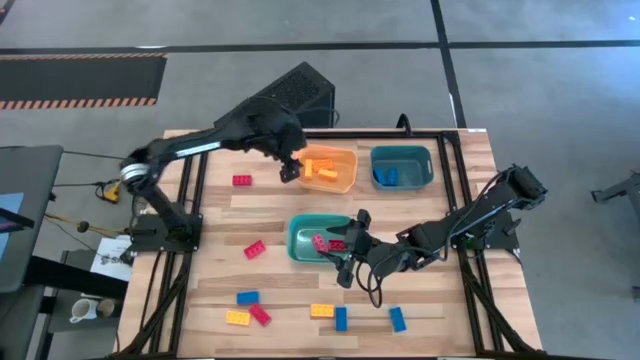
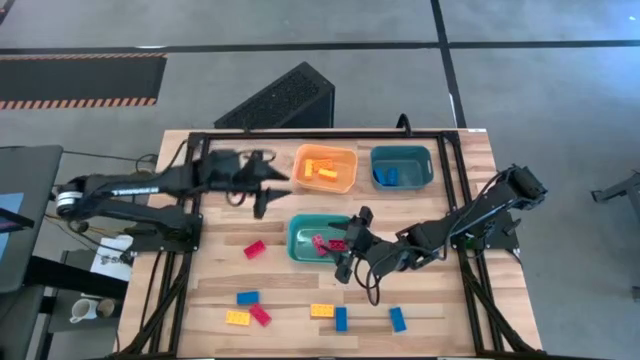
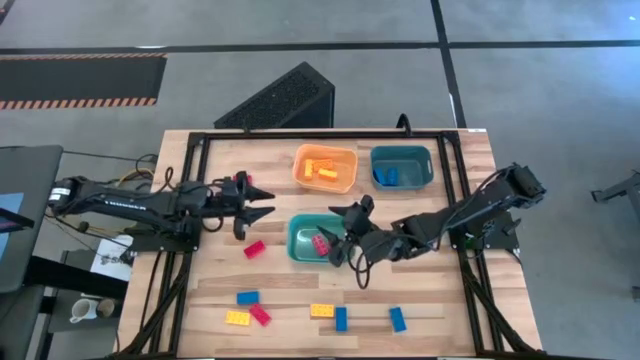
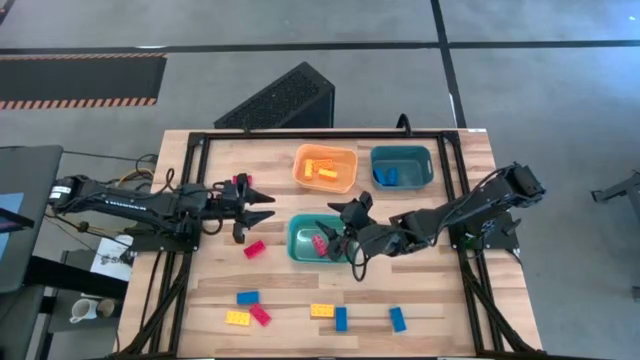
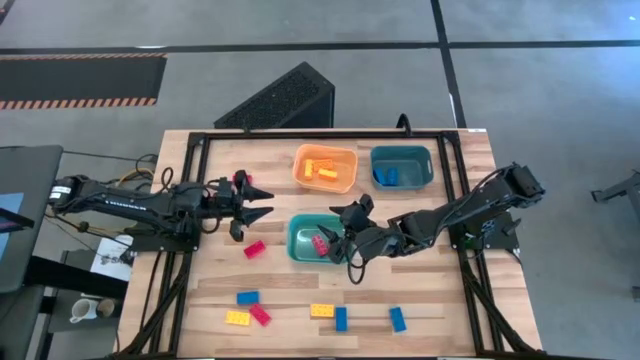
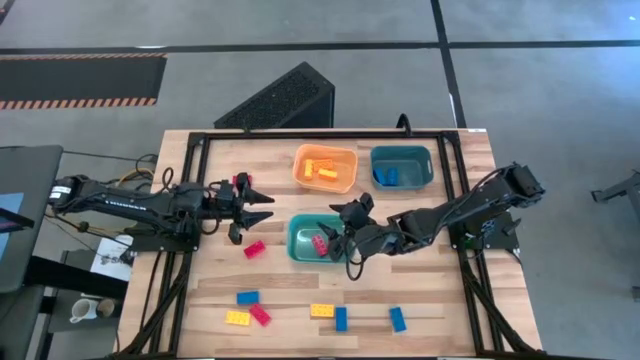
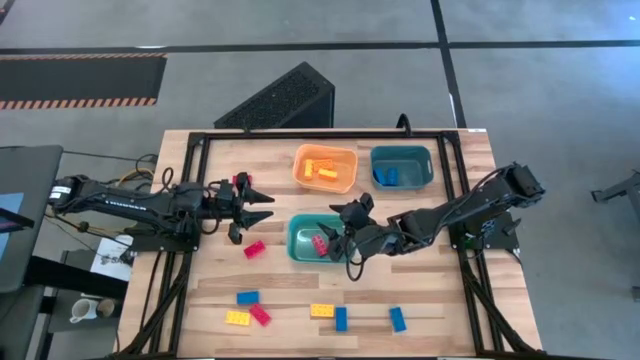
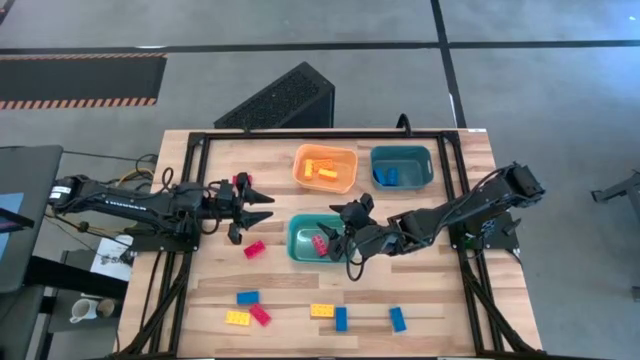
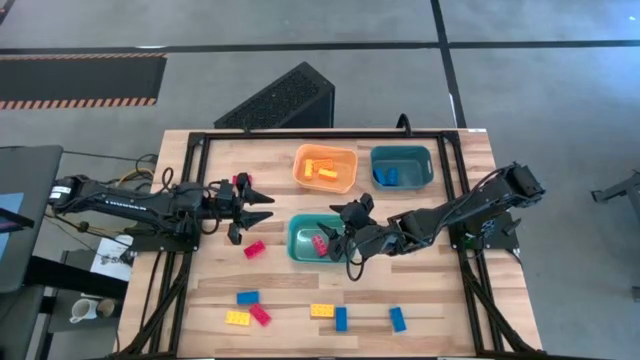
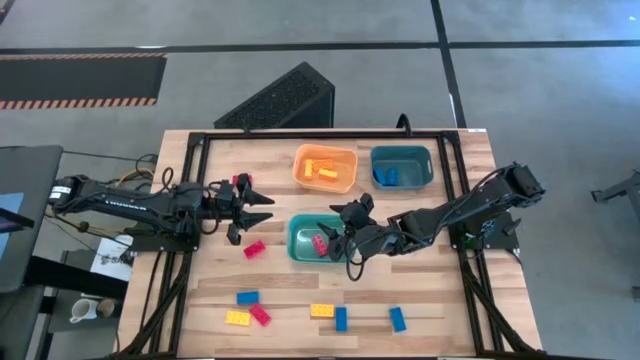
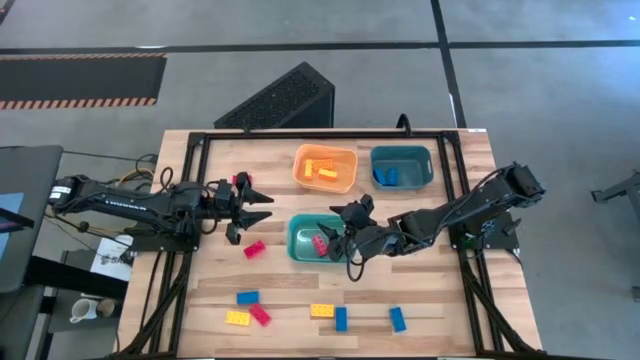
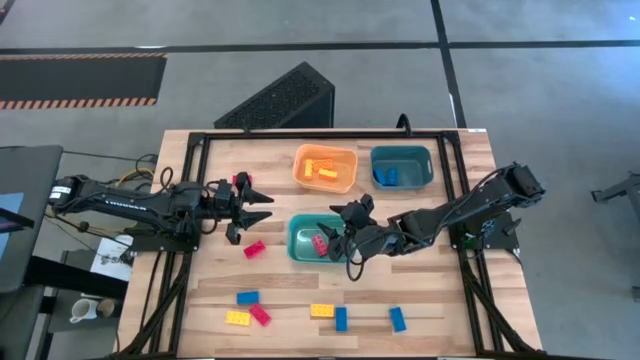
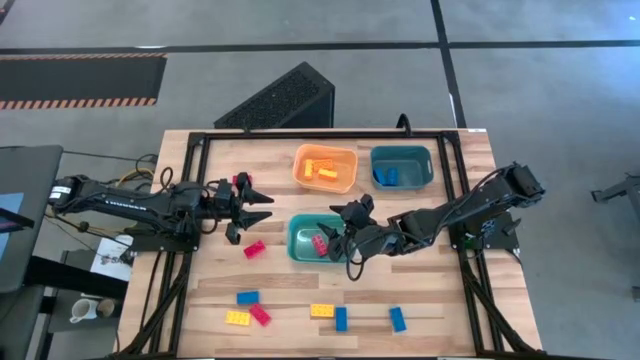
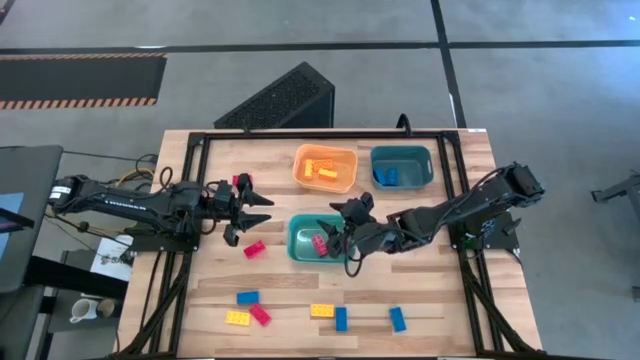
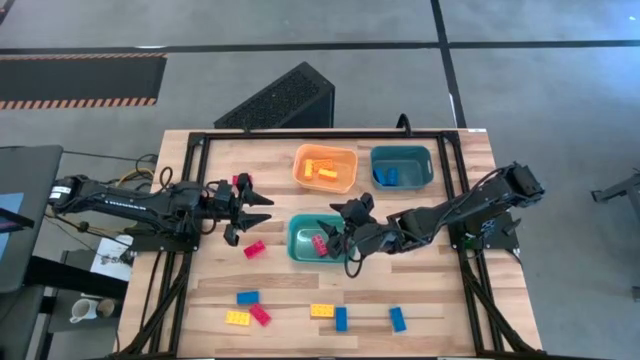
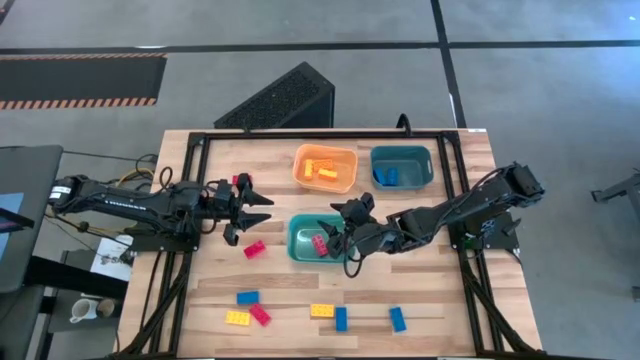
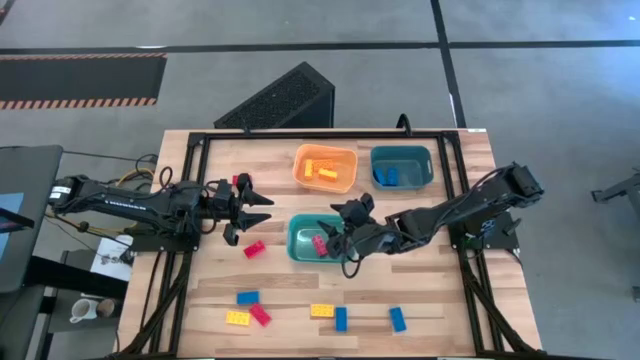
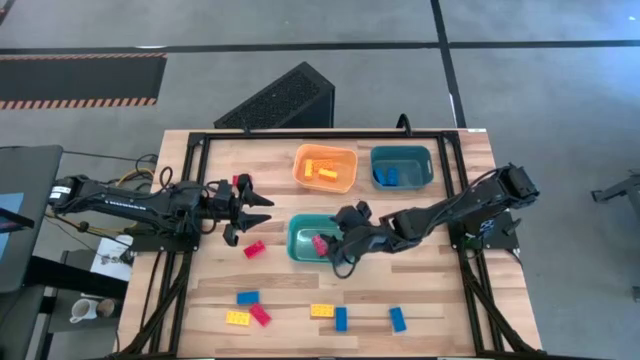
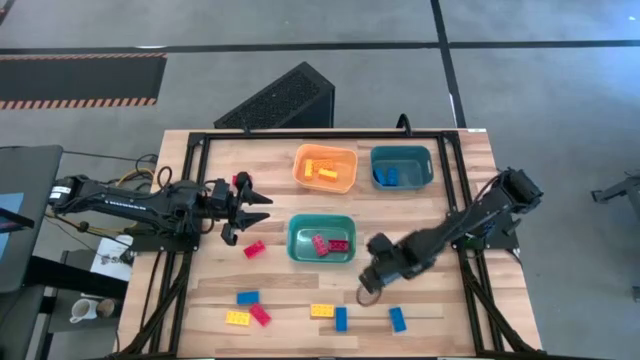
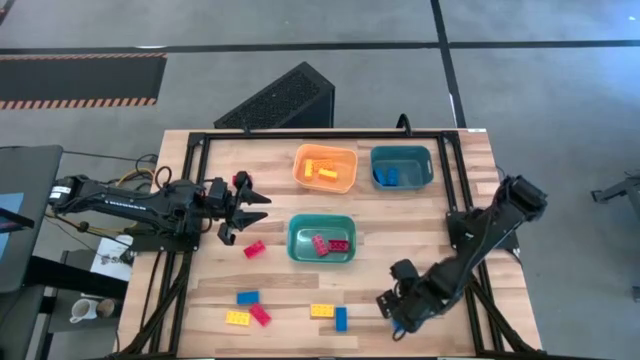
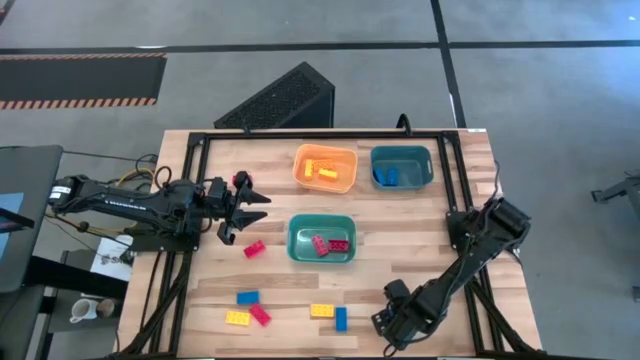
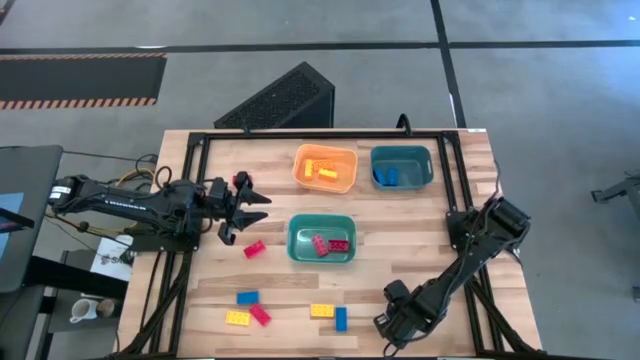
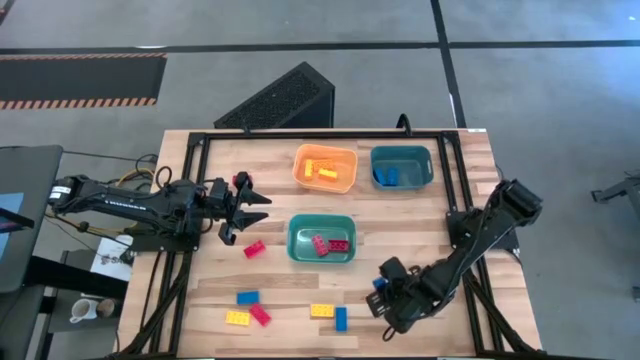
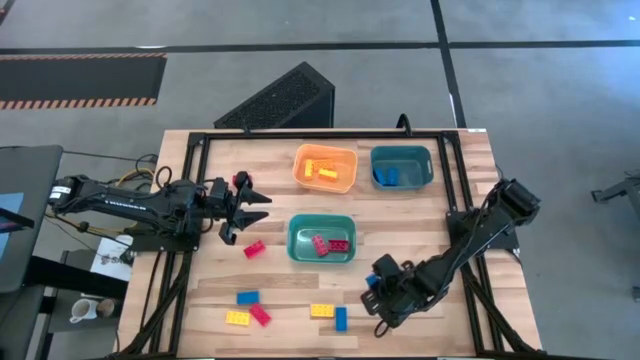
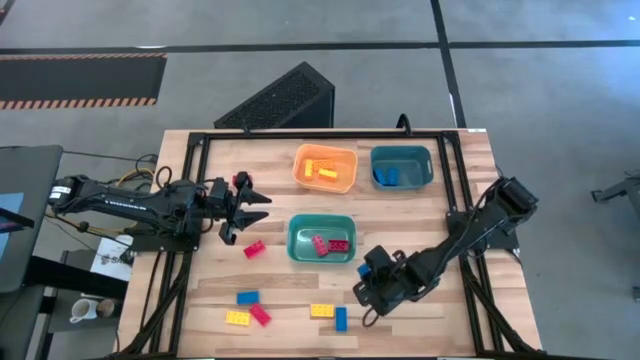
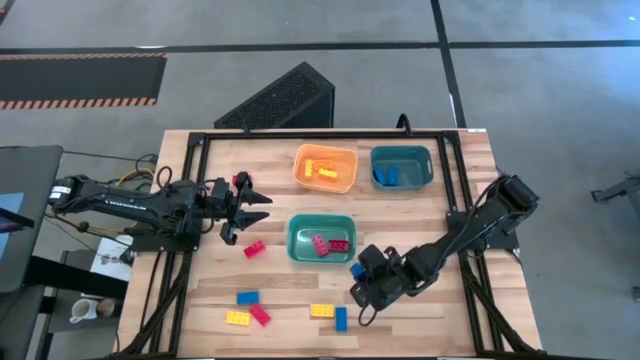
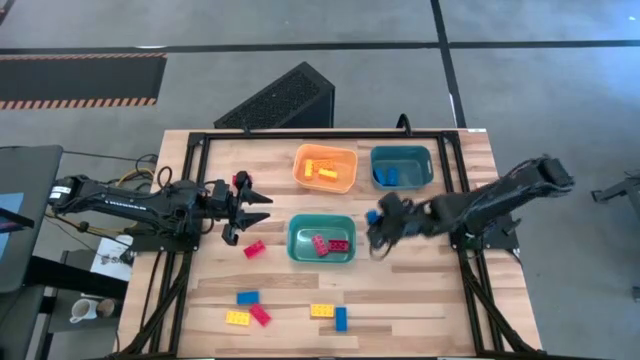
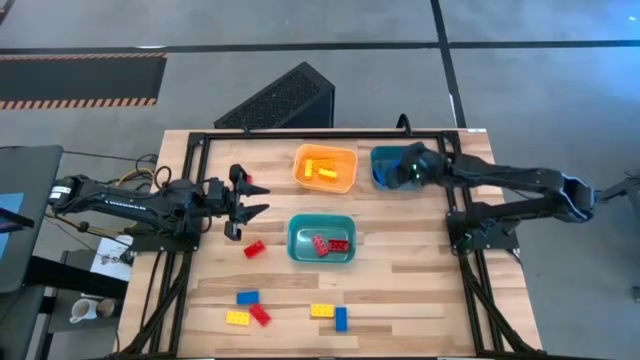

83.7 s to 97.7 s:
Task: Sort & place blocks by color
Put the blue game piece into the blue bin

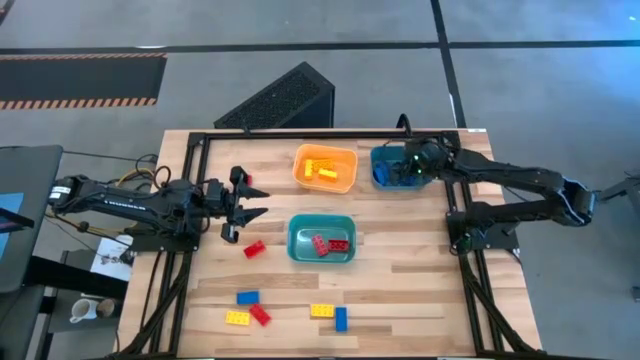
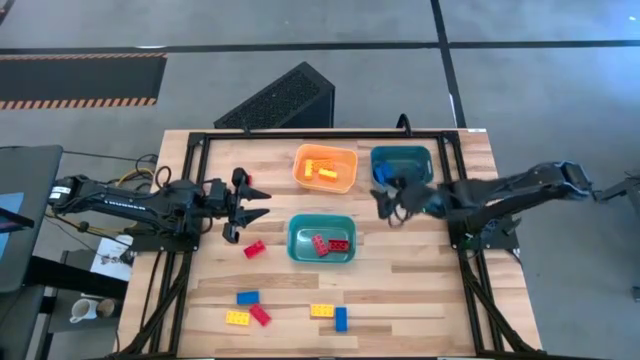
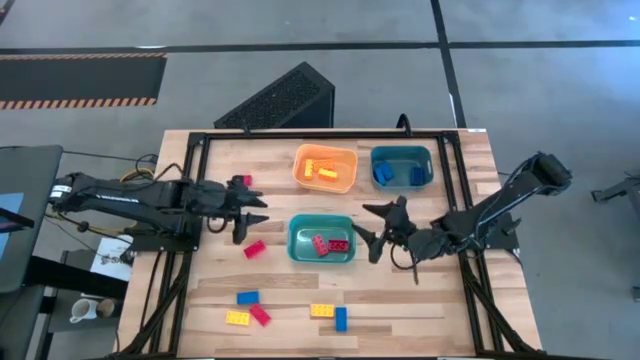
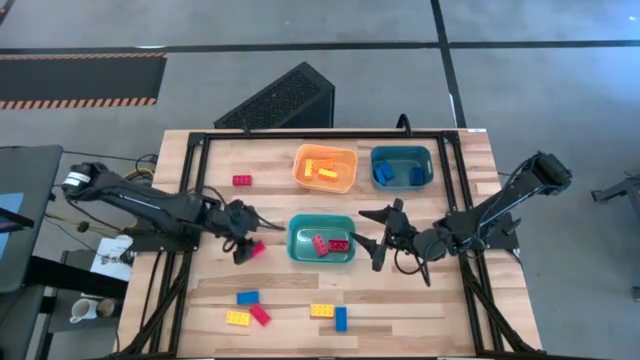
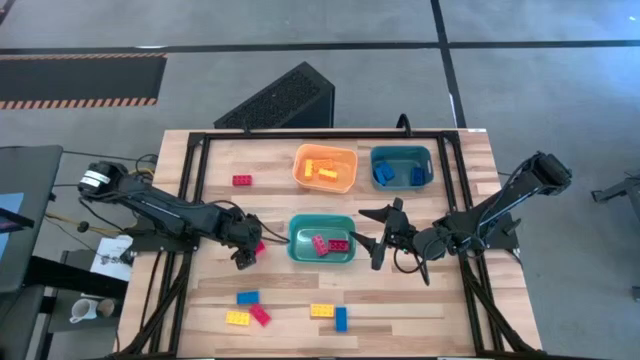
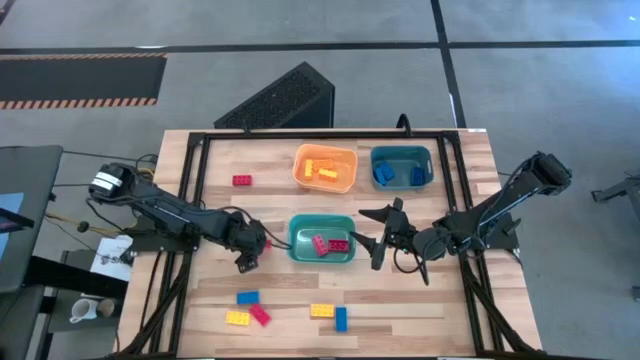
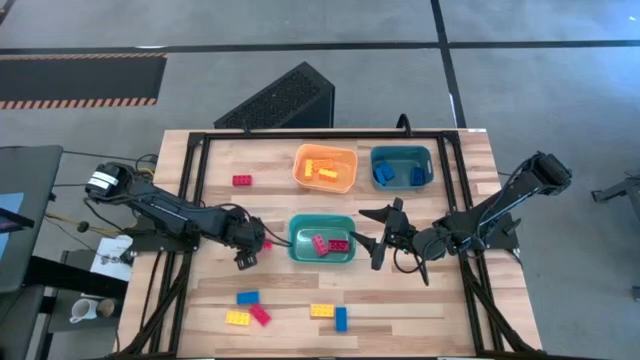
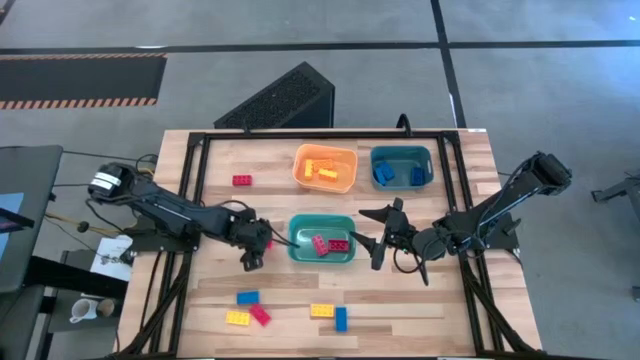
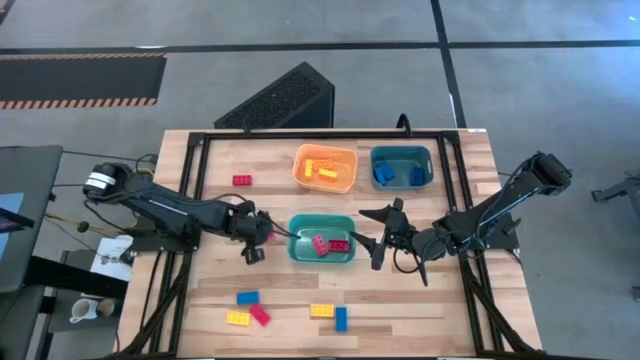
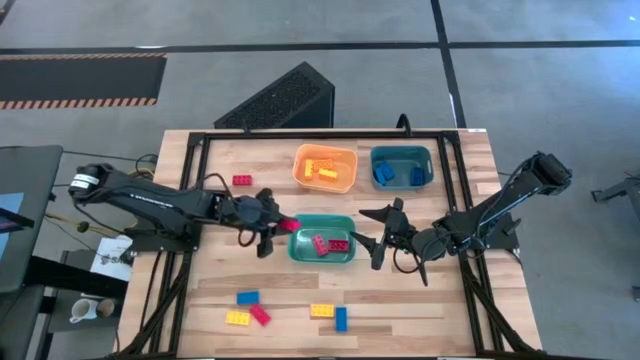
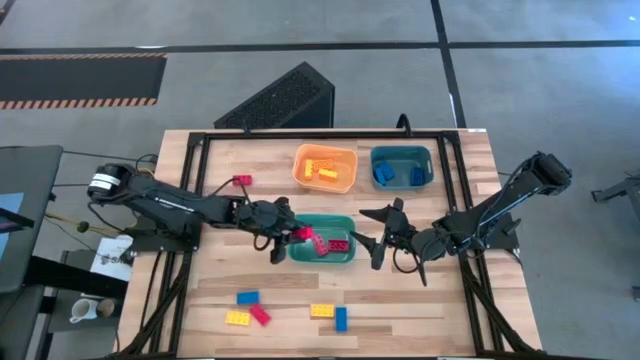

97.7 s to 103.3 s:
Put the red game piece into the green bin
